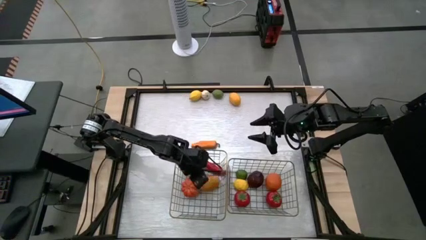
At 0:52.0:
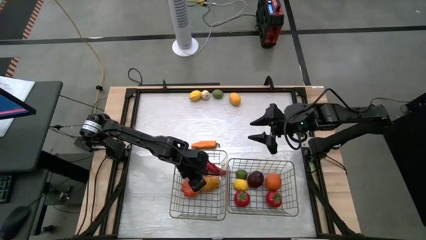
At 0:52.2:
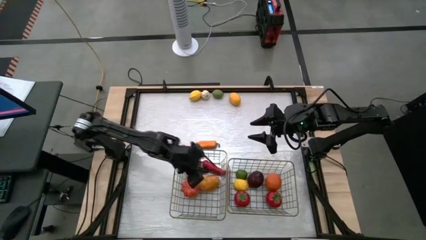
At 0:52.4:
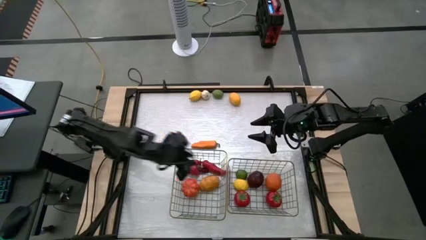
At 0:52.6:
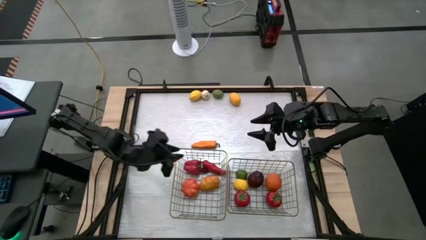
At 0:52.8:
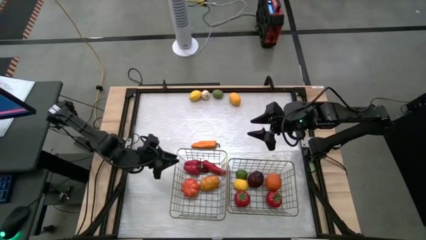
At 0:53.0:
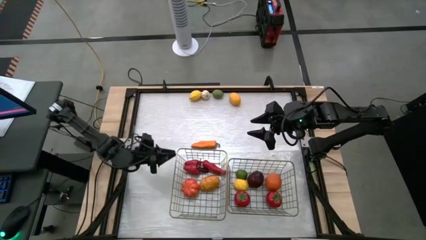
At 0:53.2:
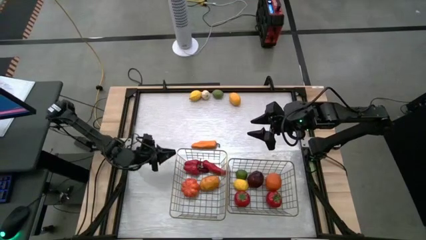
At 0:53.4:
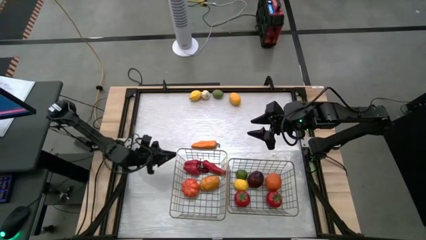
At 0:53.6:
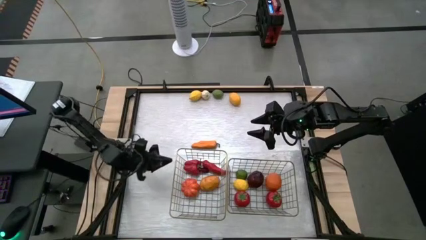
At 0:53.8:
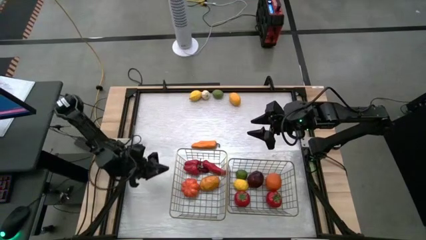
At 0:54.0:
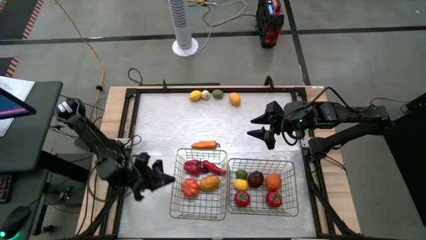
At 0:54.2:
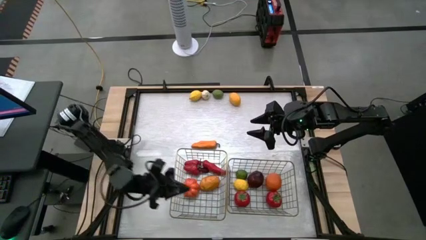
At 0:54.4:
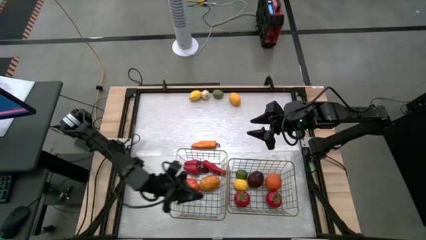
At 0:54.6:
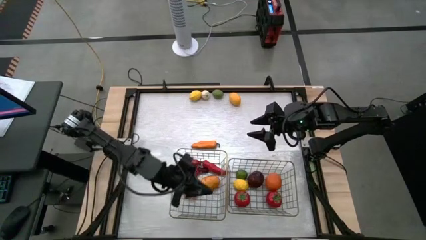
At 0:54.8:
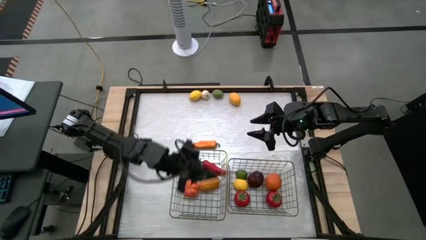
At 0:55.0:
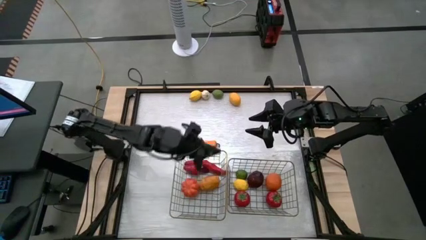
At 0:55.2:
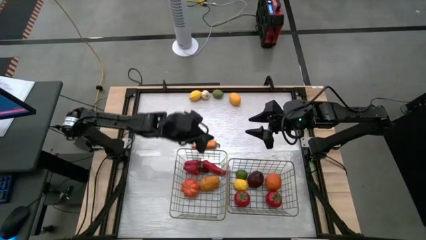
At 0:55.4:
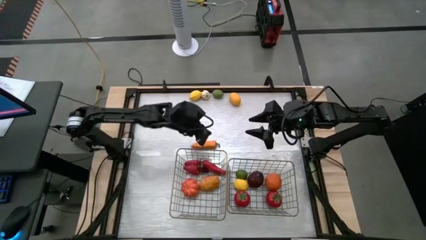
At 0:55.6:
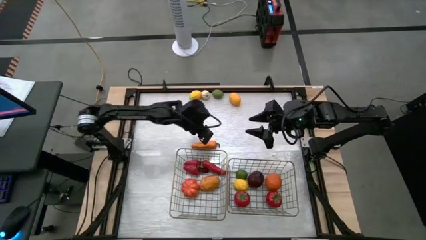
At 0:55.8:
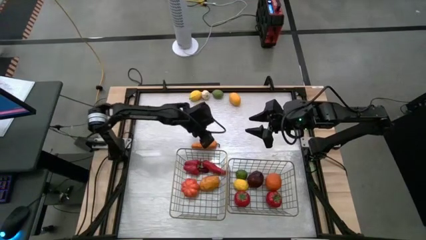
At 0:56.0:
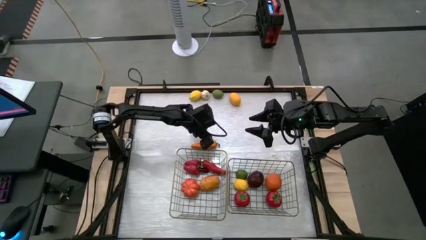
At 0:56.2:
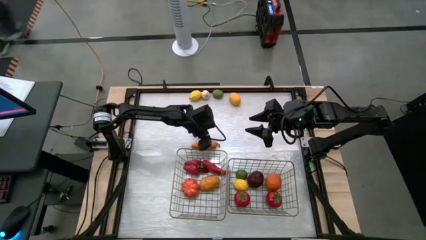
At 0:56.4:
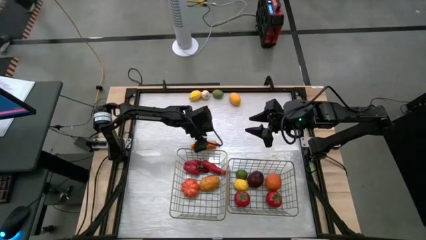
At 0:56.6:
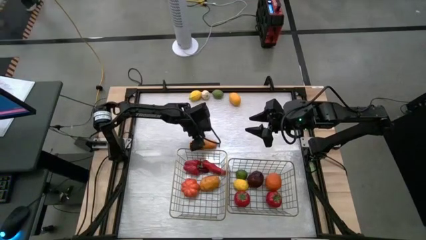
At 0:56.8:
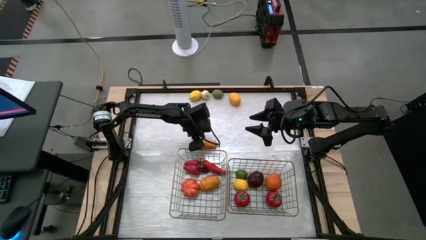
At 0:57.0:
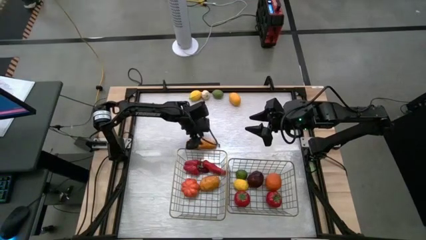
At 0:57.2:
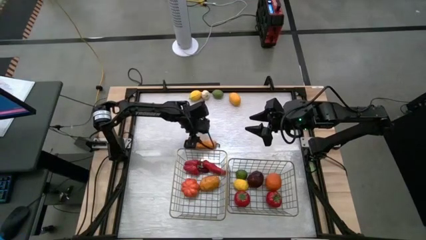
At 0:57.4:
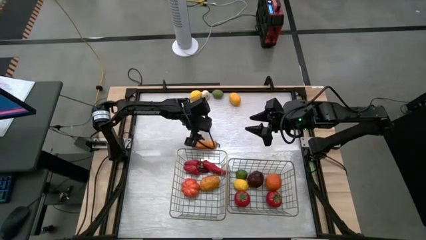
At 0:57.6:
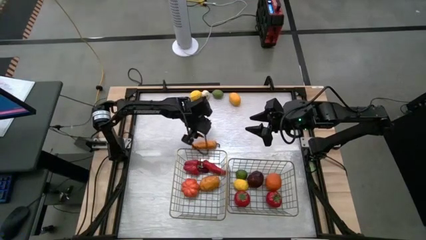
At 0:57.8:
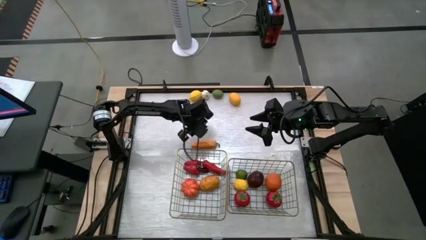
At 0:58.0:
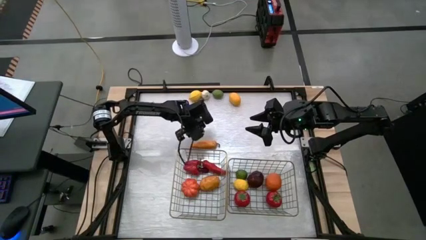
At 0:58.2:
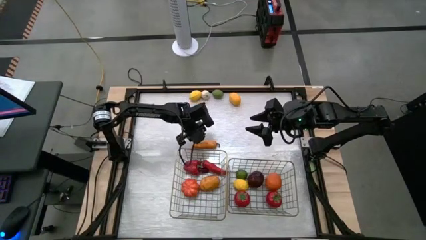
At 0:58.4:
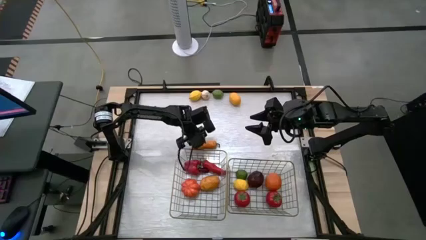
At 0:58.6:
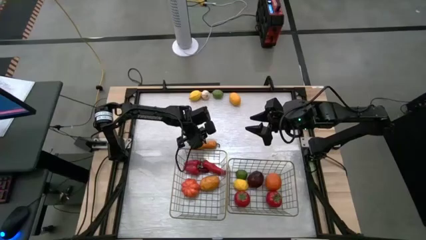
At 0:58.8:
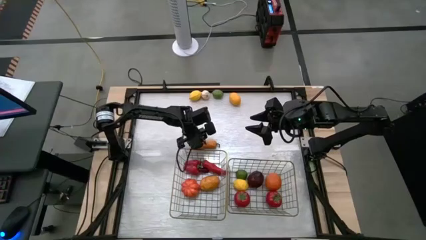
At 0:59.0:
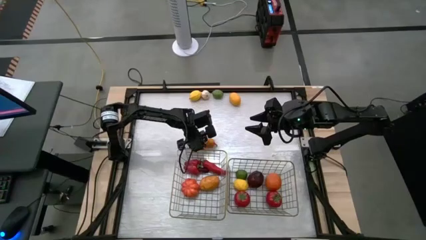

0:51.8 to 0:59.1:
Task: Sort produce into baskets
Put the orange chili into the left wire basket

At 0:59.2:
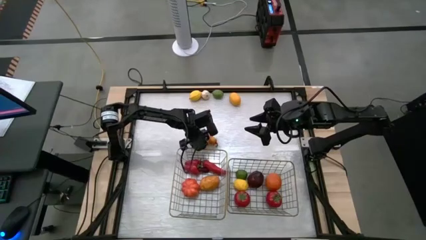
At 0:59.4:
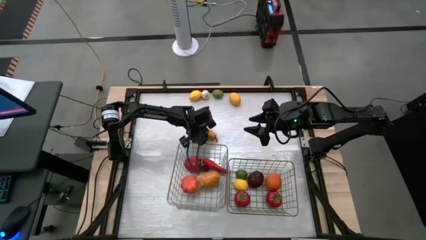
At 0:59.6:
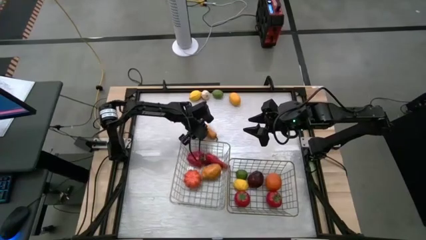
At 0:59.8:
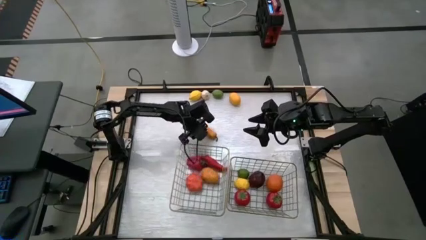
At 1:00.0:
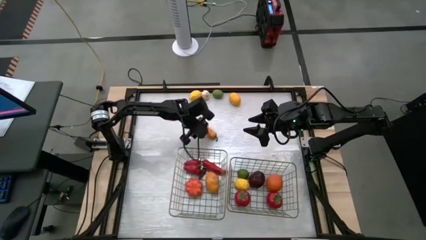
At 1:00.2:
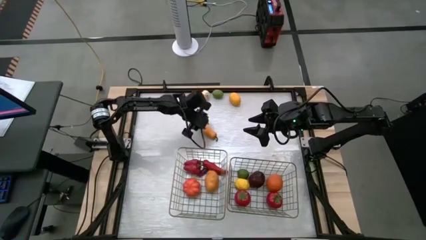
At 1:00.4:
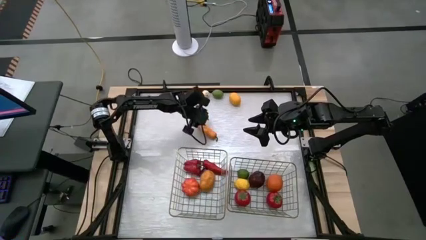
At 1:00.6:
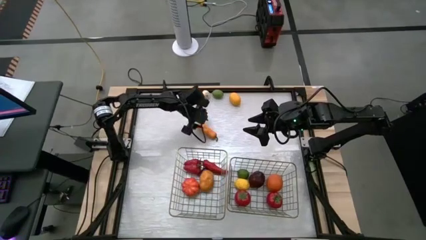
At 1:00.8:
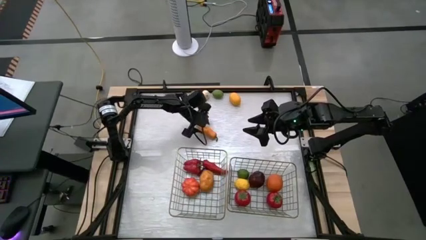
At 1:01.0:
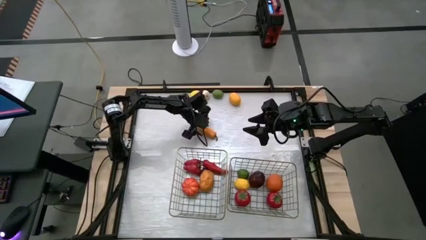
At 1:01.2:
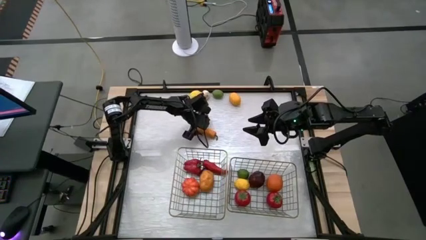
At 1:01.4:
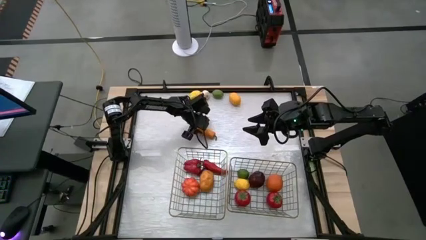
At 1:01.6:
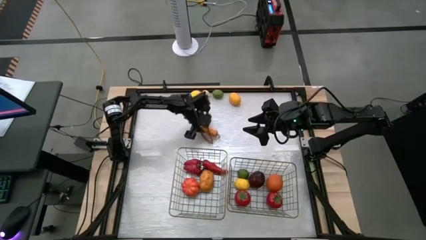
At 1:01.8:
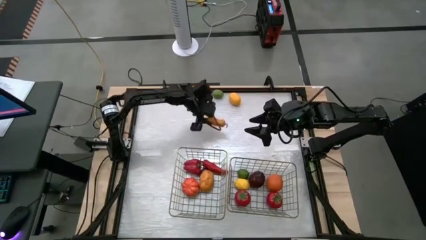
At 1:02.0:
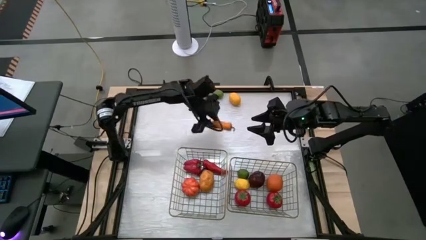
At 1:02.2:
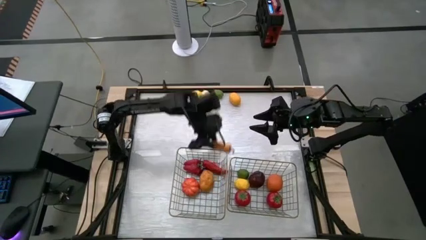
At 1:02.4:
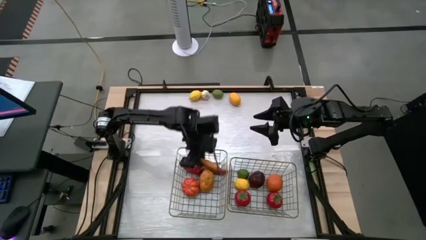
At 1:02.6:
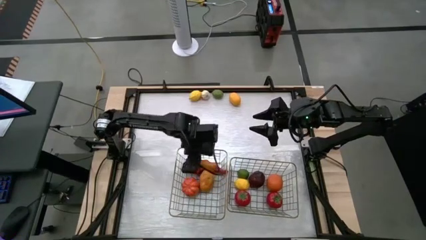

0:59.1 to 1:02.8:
Put the orange chili into the left wire basket

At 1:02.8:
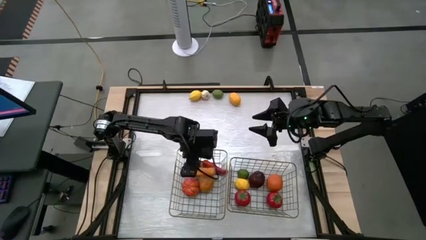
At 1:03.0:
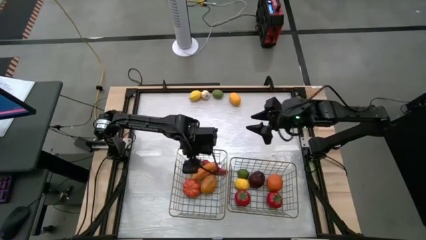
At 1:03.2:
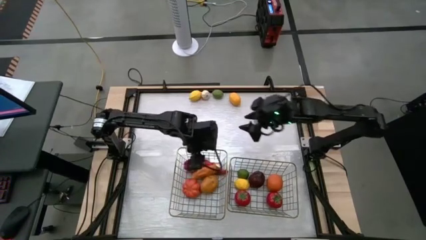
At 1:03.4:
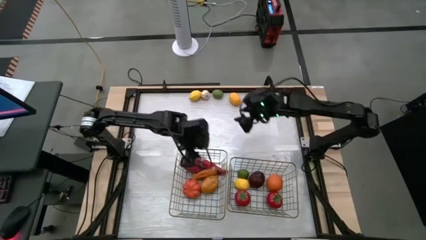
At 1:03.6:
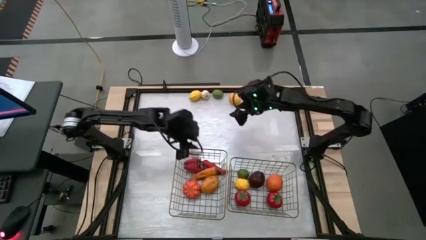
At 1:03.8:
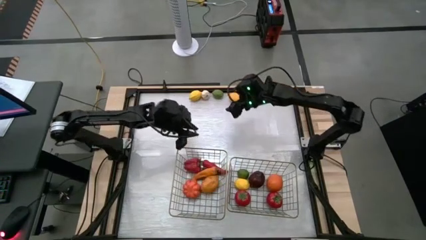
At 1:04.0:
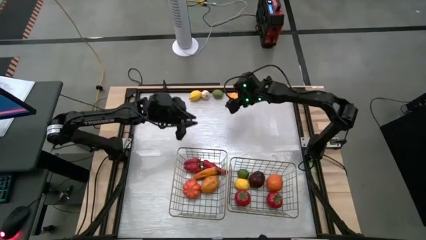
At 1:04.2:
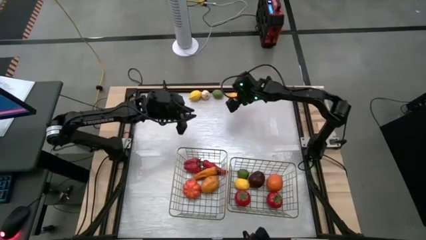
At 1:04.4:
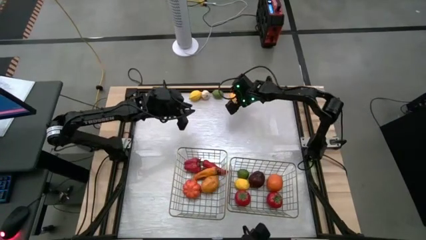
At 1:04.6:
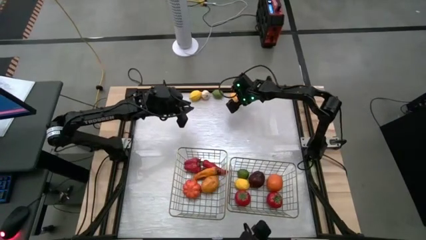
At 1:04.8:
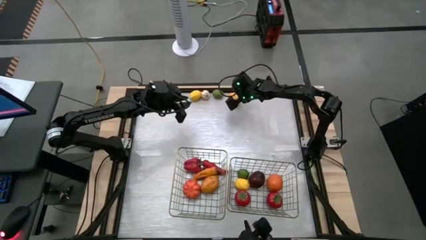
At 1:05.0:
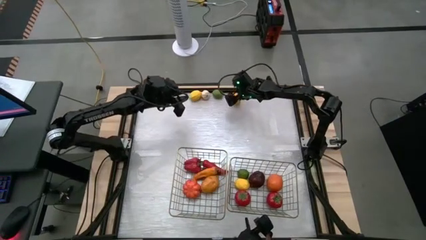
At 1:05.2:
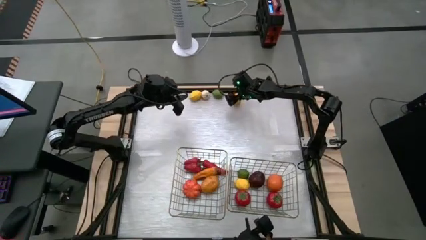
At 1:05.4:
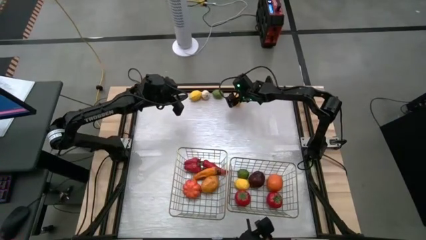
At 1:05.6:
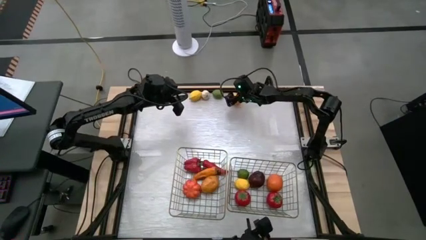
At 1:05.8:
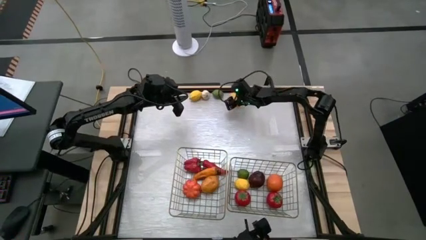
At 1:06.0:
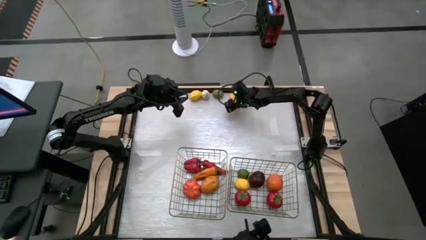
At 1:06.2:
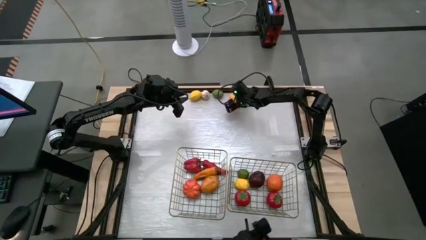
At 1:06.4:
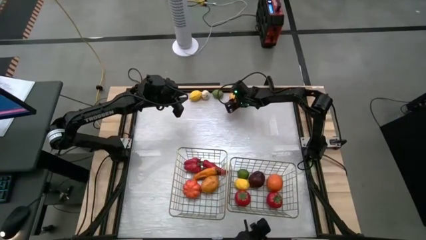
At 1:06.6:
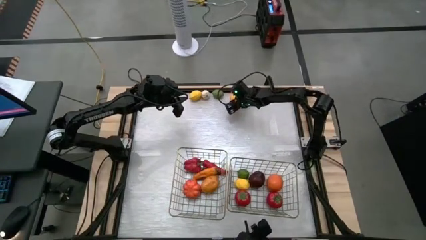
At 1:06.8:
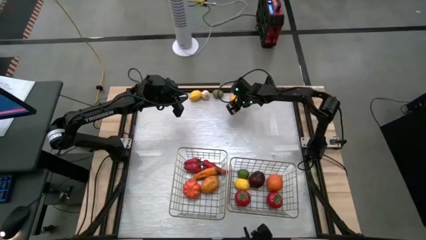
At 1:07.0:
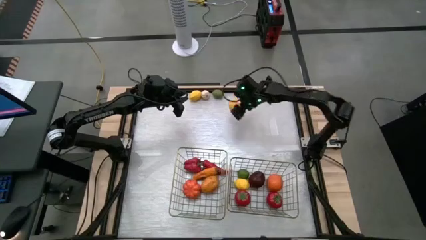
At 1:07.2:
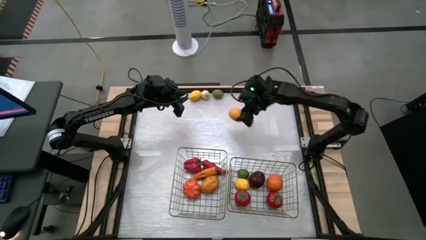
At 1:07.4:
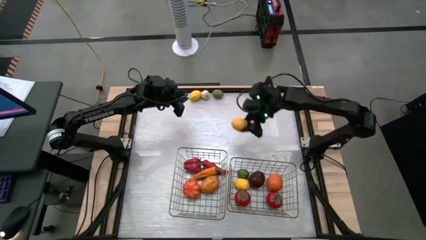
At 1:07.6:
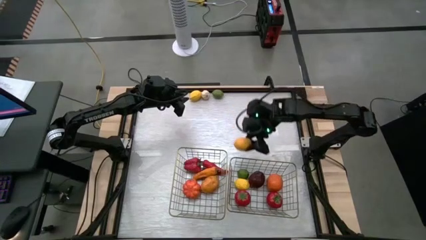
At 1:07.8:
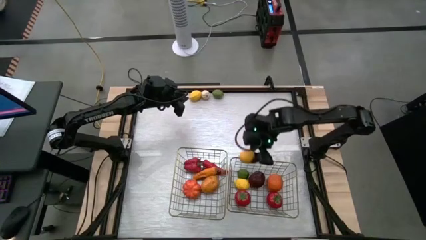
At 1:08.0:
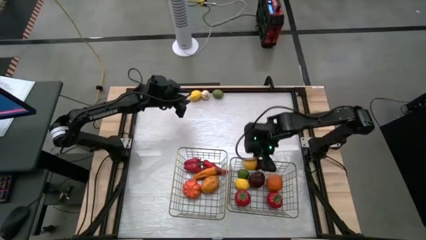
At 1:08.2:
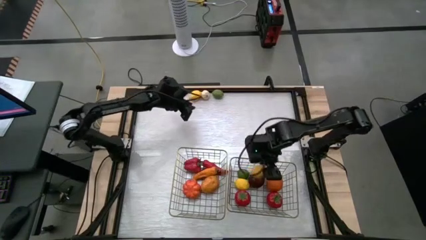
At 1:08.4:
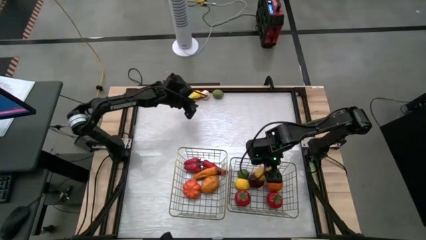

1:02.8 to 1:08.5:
Put the right yellow lemon into the right wire basket
